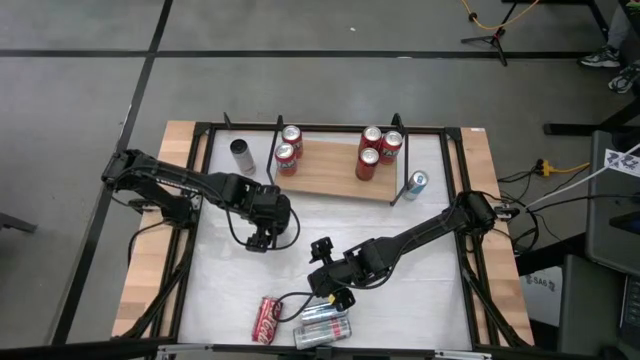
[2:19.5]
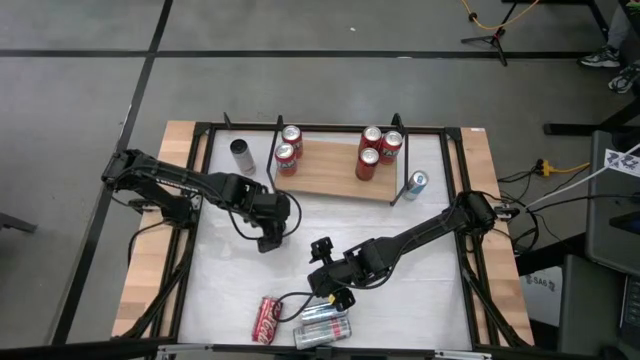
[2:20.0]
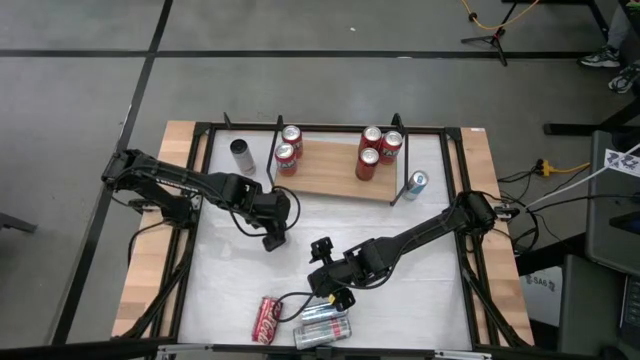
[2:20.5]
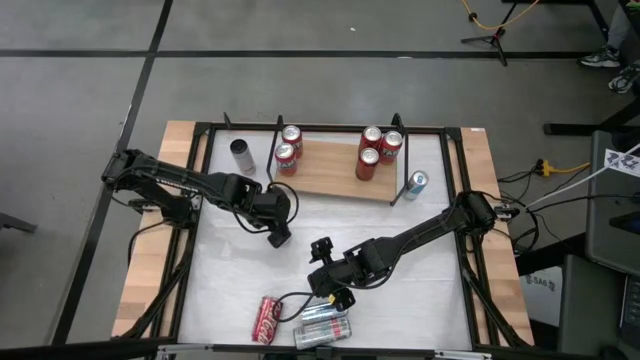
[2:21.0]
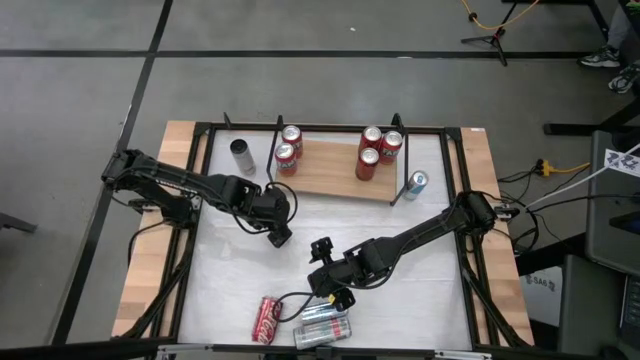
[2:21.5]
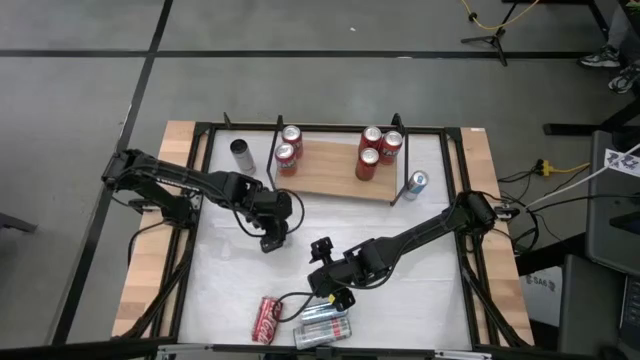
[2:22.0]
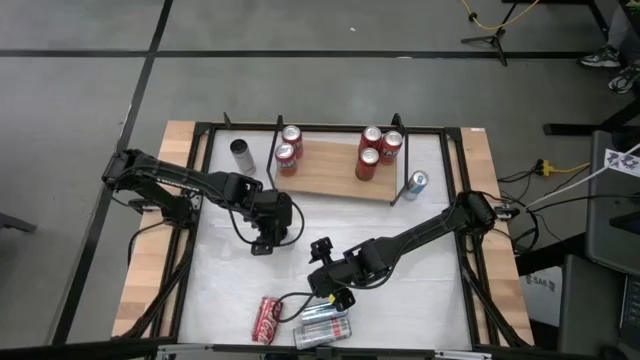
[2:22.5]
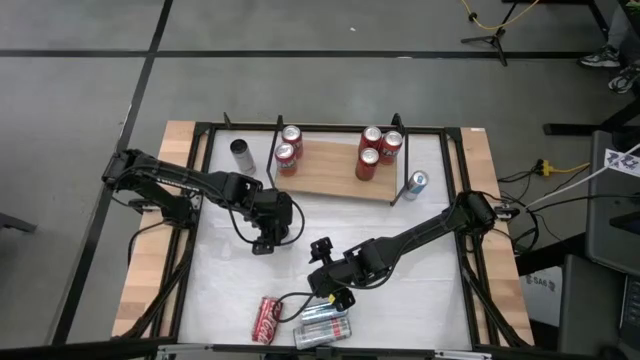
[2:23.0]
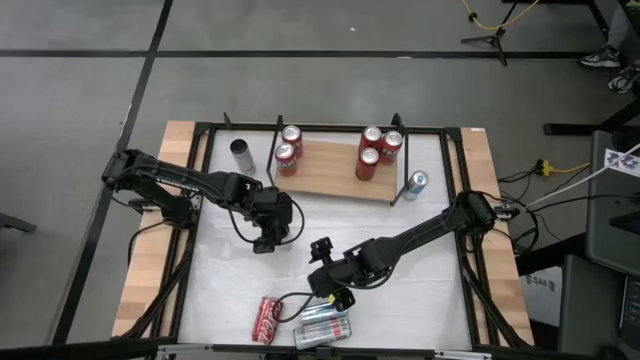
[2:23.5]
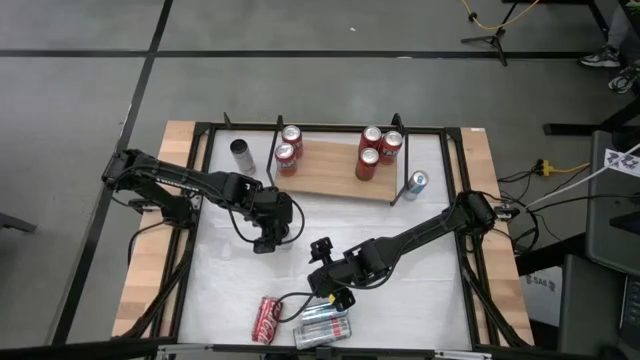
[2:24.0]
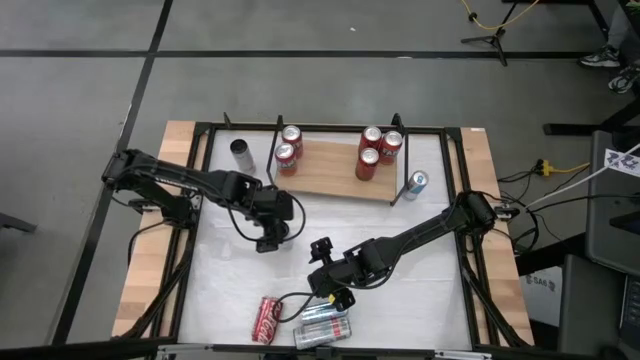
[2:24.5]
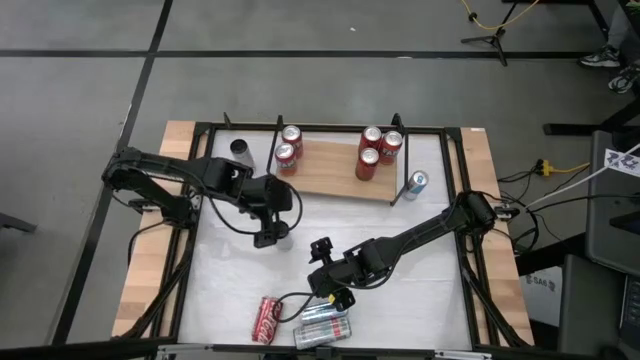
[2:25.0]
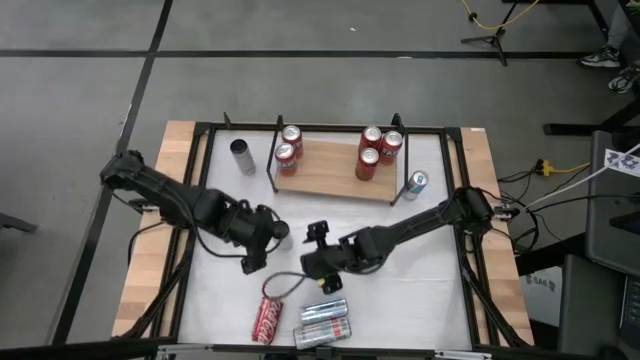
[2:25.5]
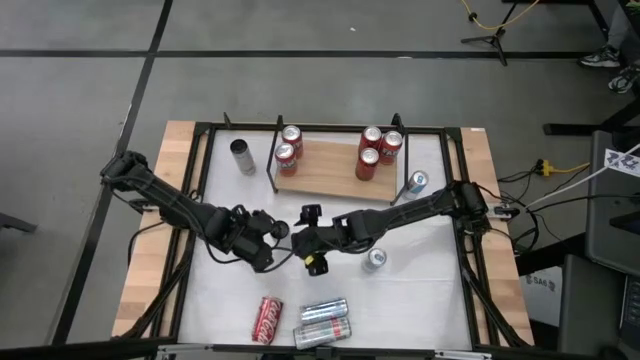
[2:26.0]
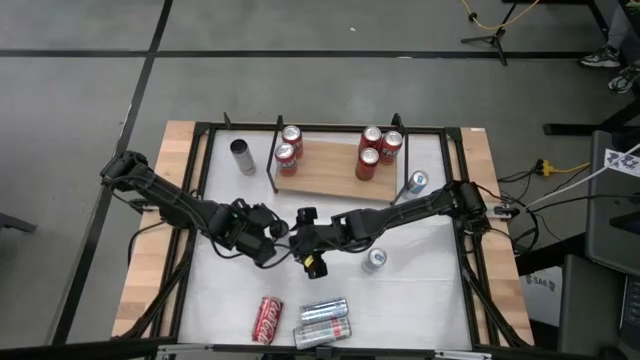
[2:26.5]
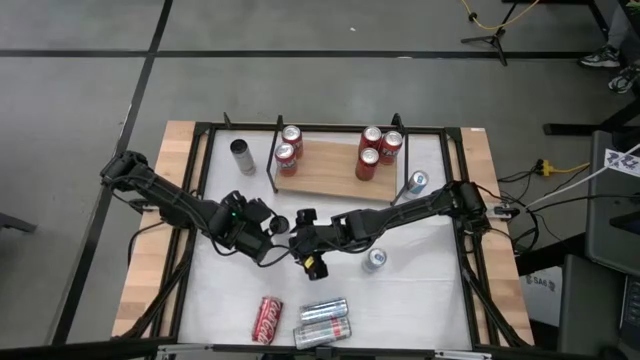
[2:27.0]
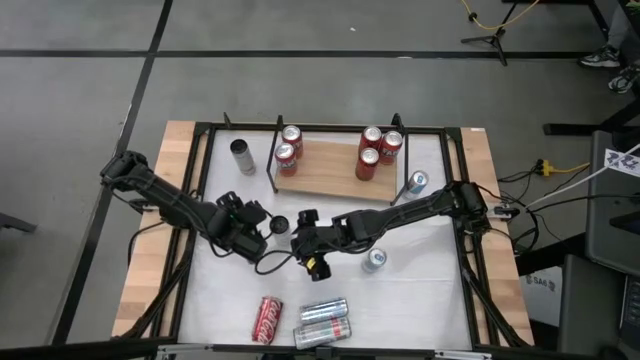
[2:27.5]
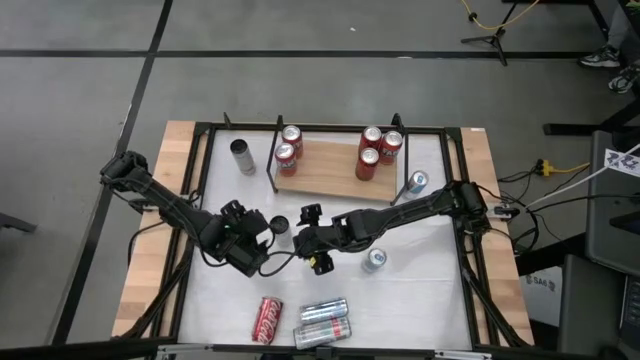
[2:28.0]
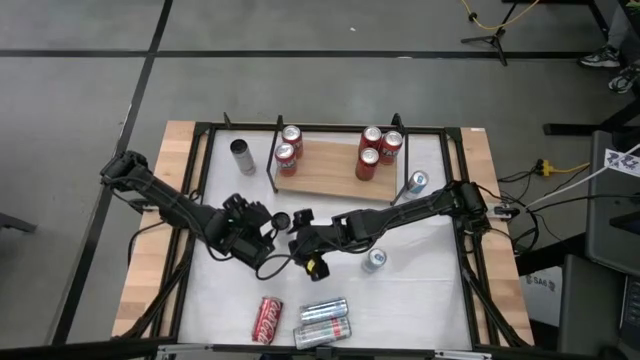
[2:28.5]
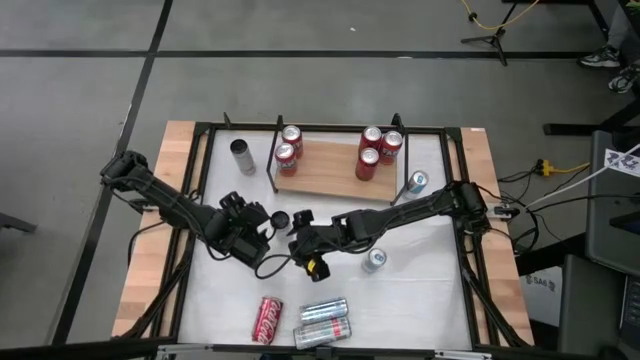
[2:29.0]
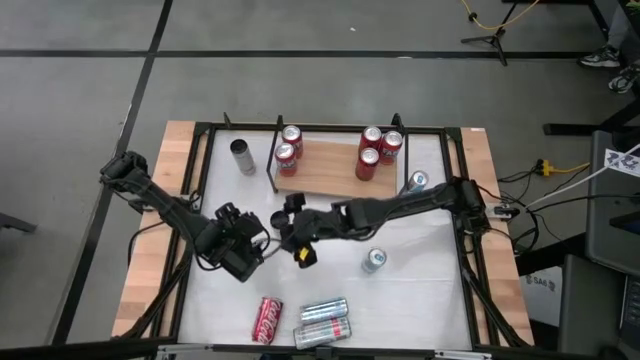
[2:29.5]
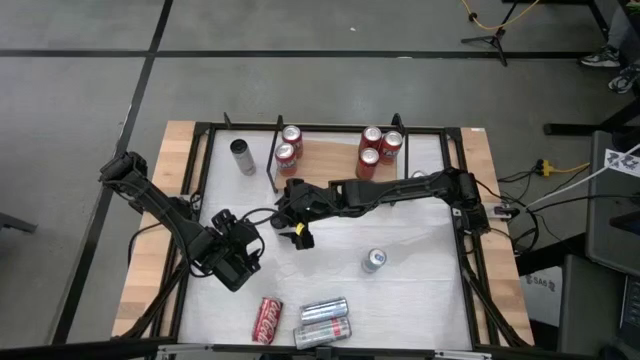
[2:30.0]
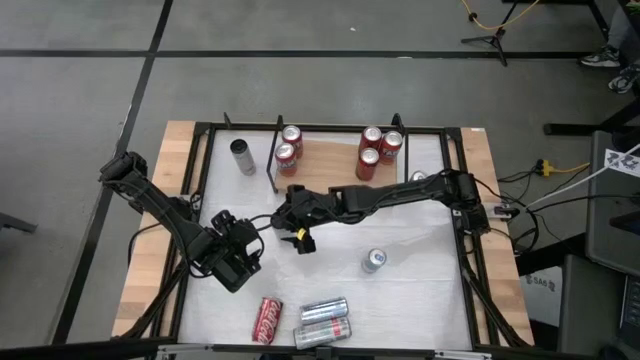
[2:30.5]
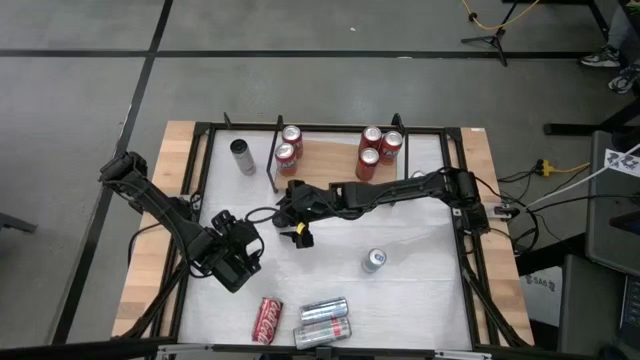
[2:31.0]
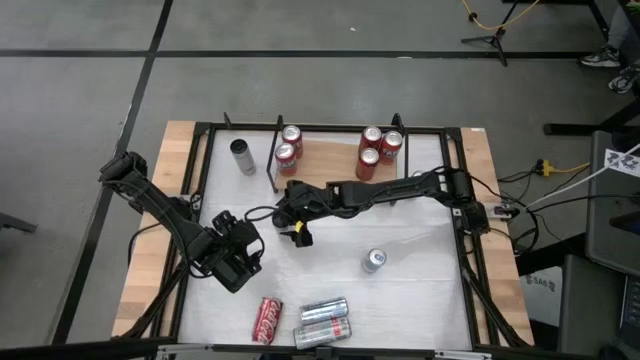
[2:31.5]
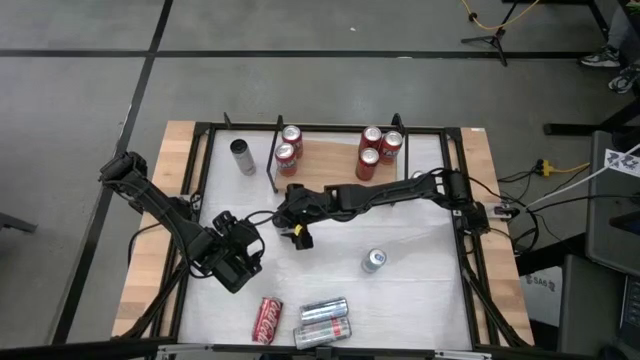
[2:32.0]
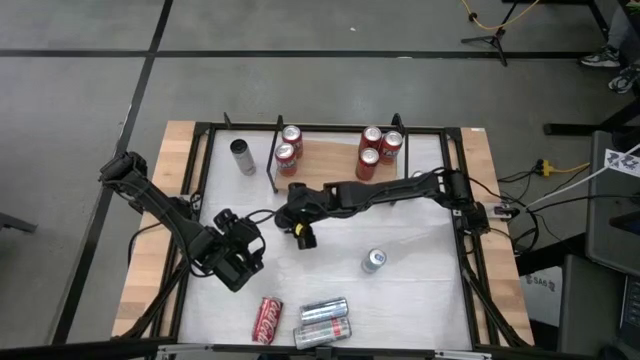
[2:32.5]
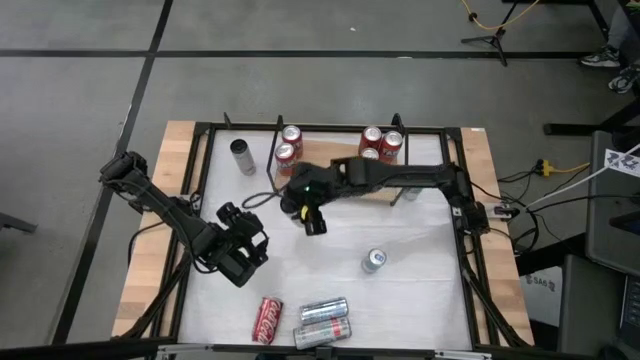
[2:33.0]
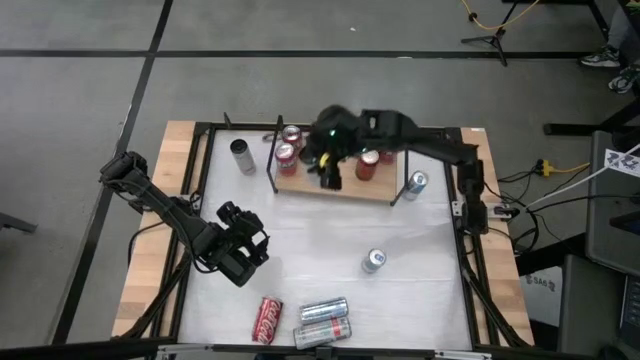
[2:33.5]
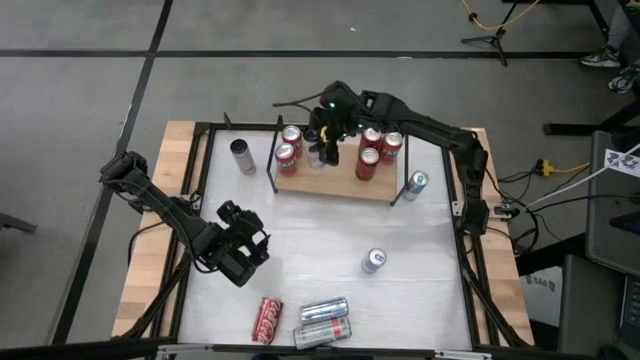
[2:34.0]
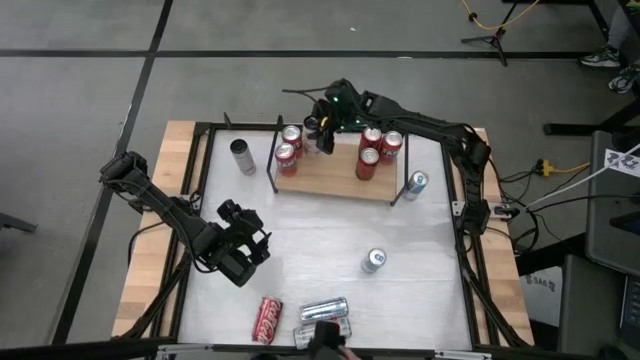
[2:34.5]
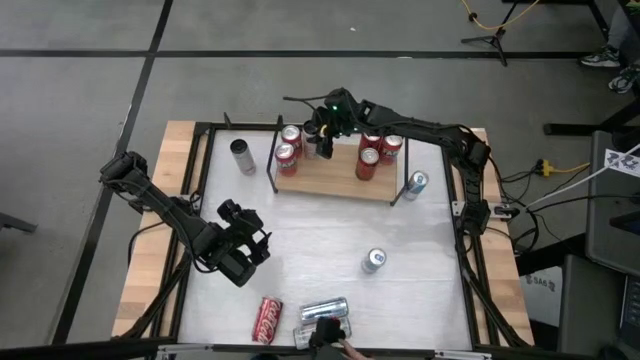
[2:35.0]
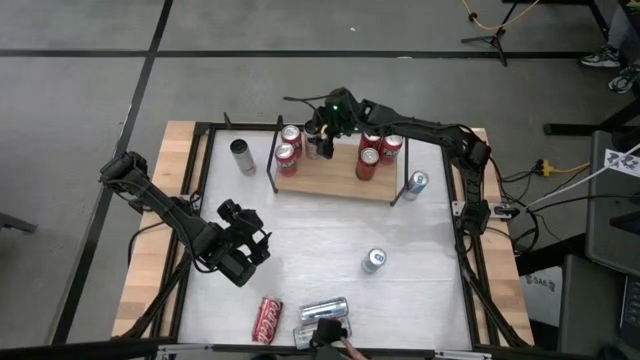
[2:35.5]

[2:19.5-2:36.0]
Task: Place canned beverage on shelf
Put the middle white-pink soda can on the shelf

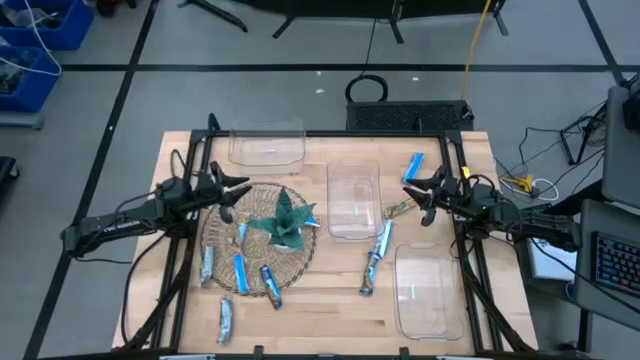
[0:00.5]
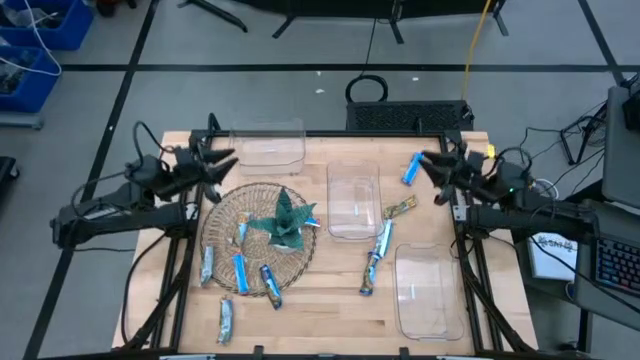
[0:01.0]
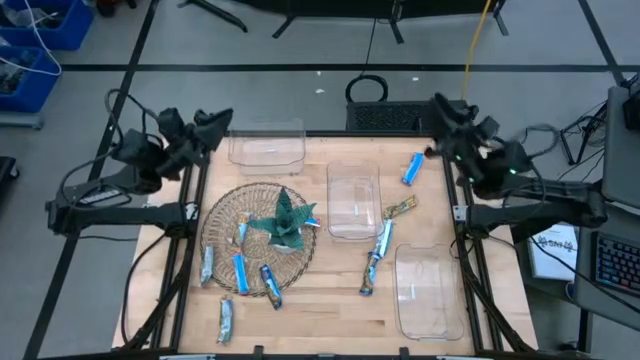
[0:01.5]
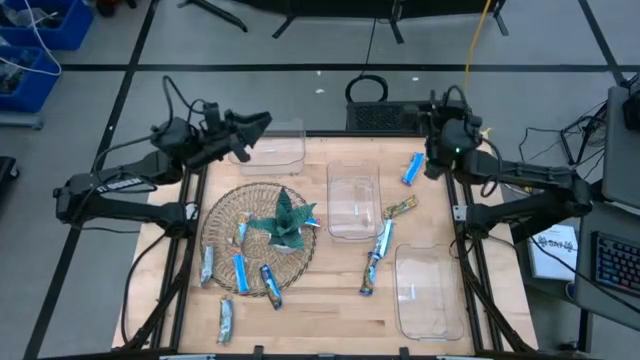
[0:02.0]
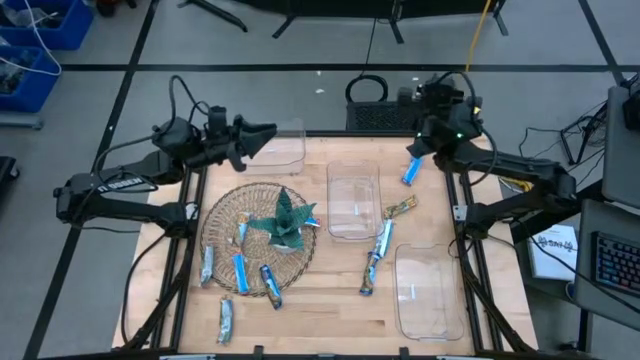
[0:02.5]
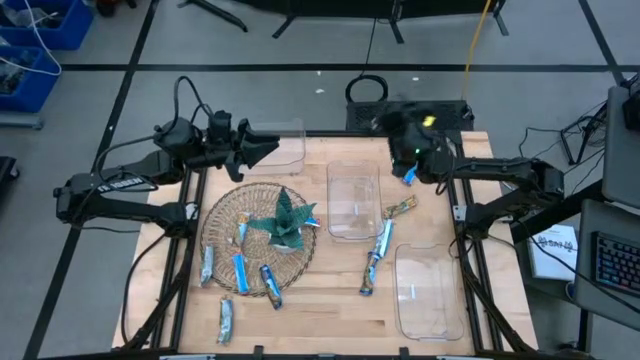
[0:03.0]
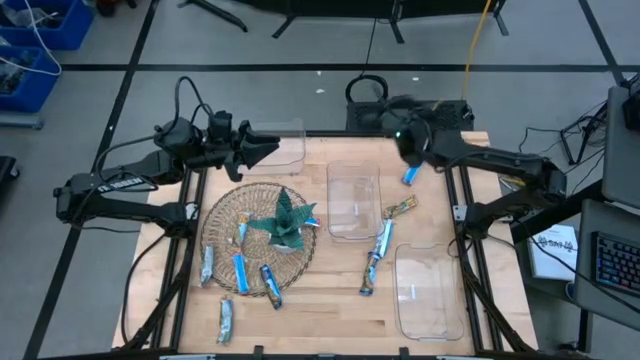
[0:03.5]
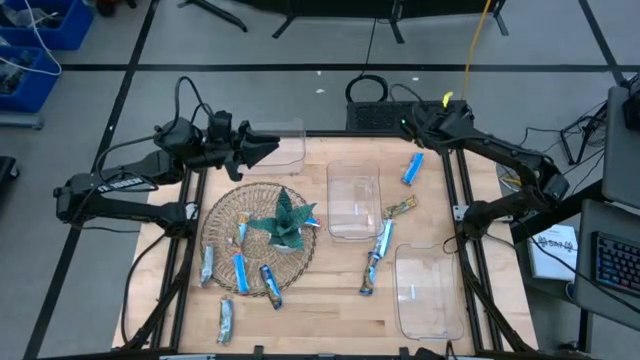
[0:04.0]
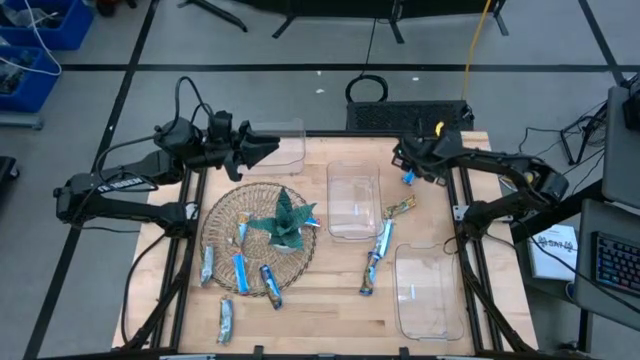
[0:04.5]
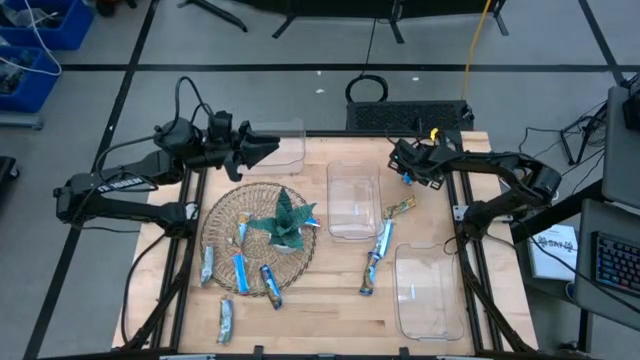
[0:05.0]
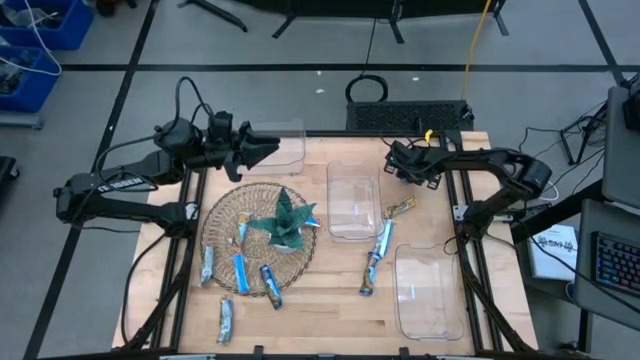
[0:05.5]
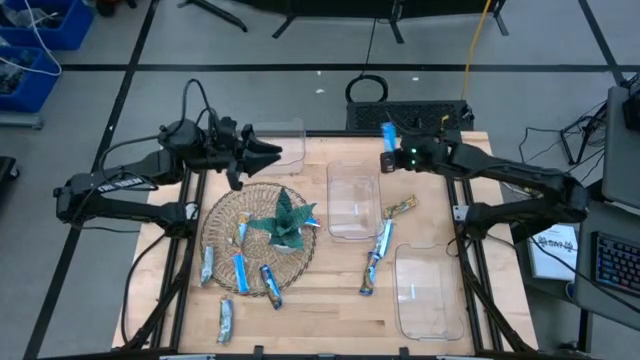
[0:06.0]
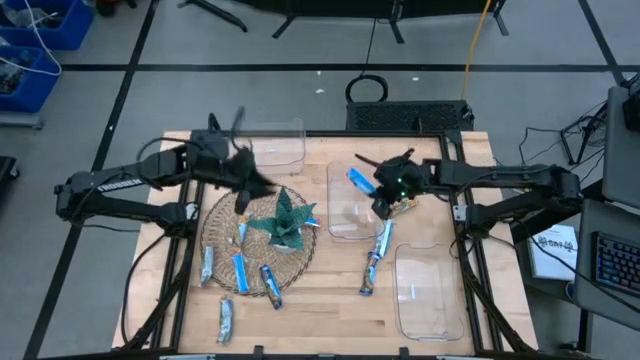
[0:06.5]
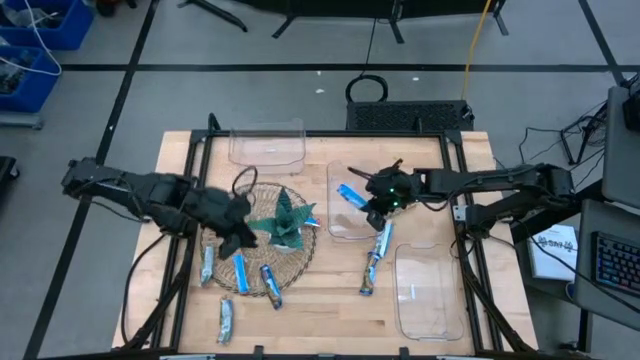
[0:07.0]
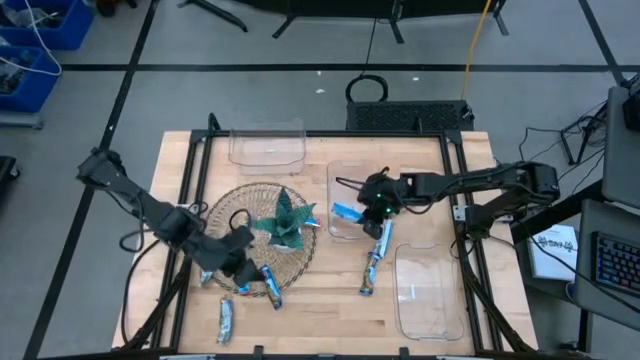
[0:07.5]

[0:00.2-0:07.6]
Task: Pick and place Granola Bars by type
Put the blue granola bar into the middle transparent bin
